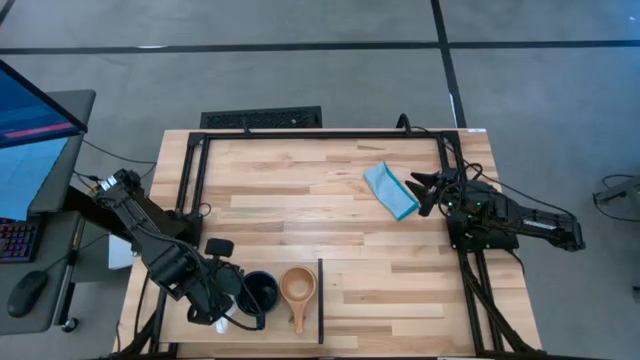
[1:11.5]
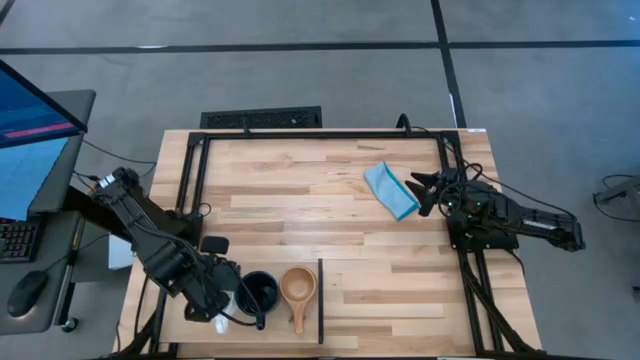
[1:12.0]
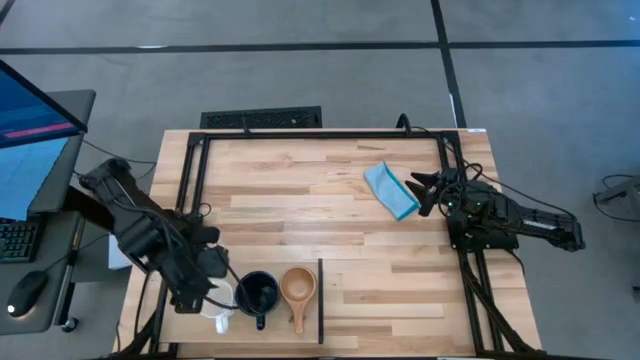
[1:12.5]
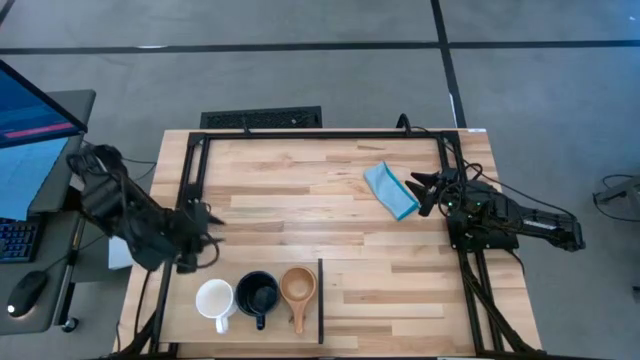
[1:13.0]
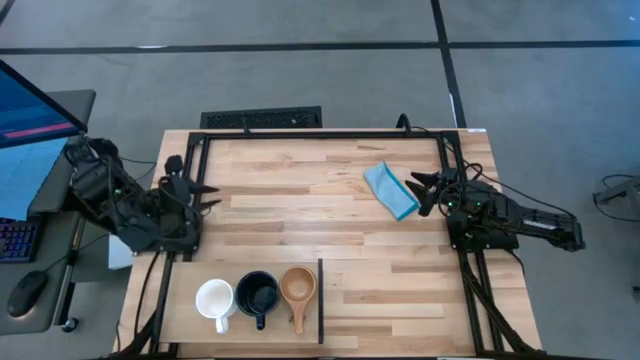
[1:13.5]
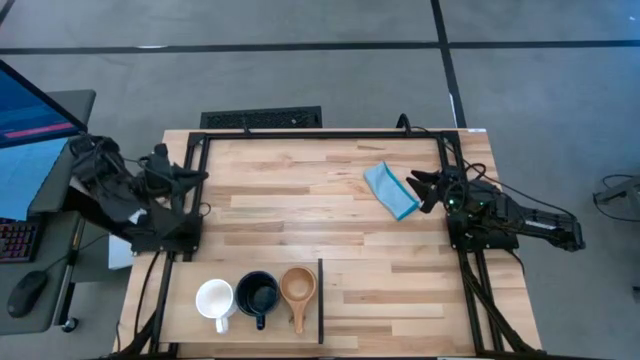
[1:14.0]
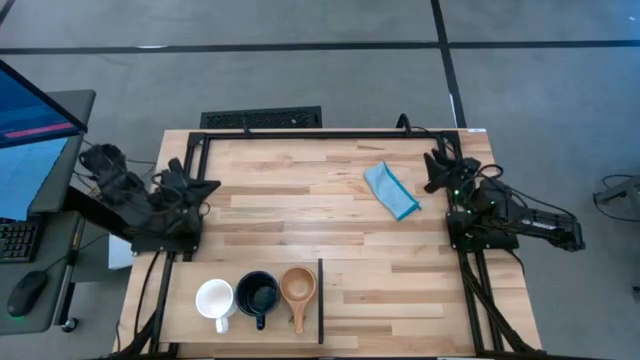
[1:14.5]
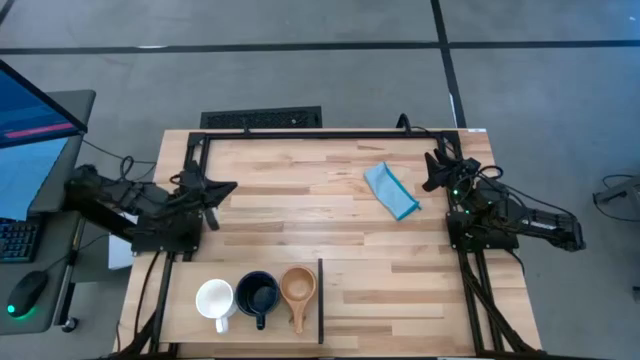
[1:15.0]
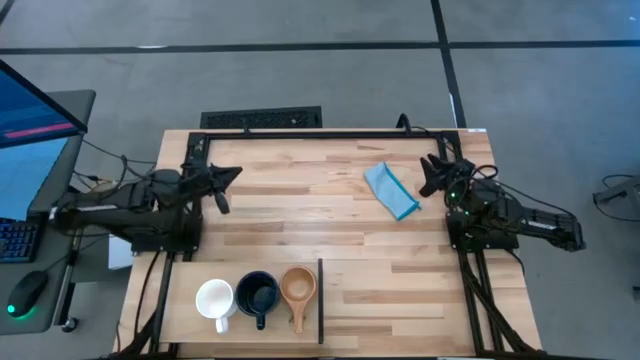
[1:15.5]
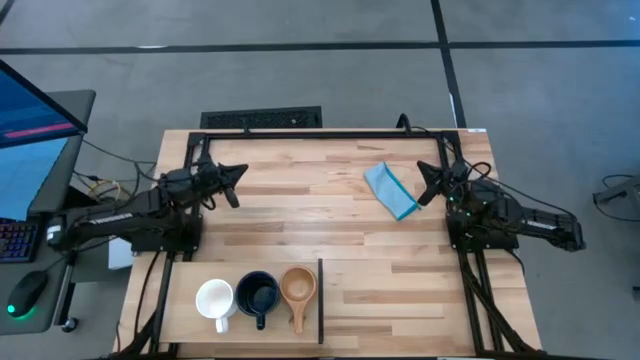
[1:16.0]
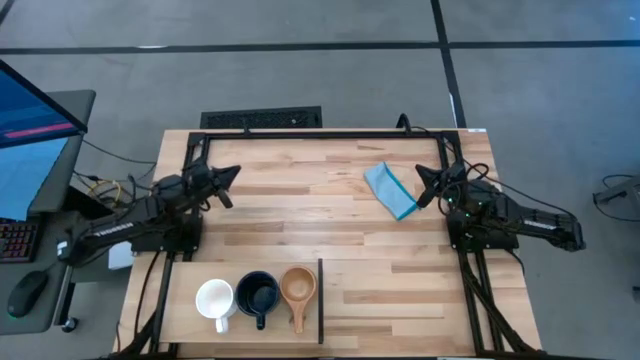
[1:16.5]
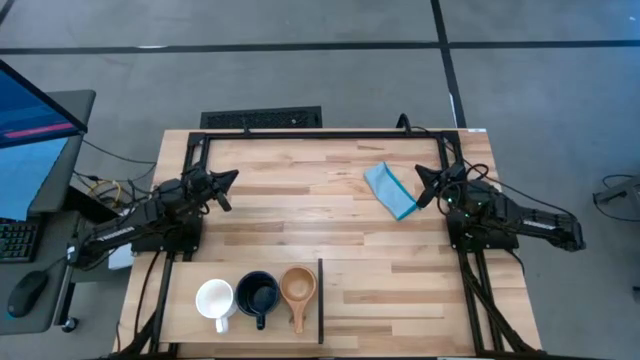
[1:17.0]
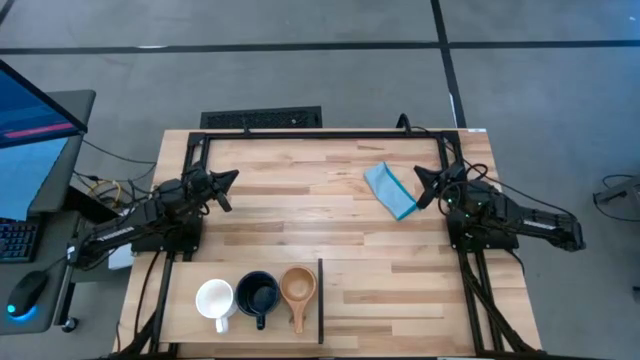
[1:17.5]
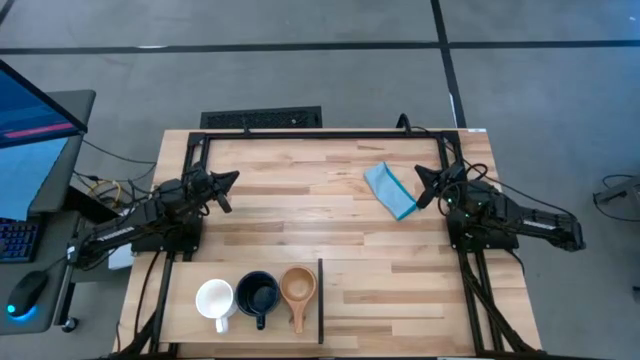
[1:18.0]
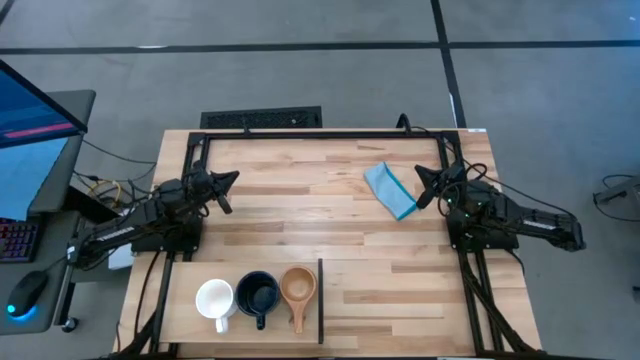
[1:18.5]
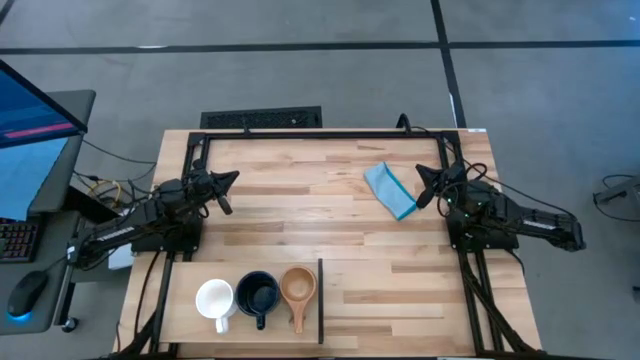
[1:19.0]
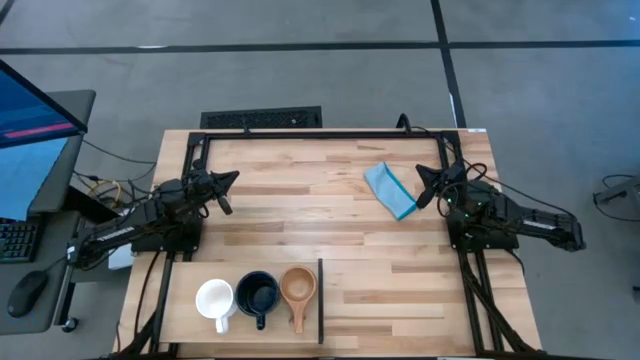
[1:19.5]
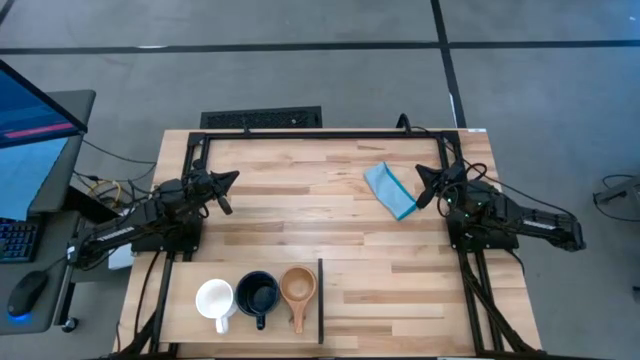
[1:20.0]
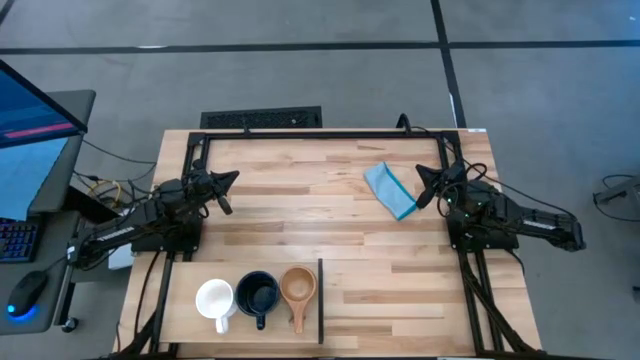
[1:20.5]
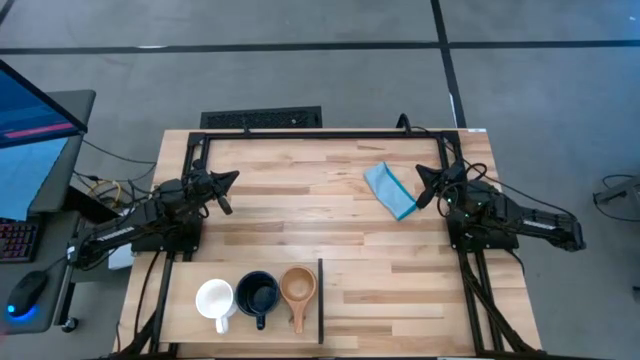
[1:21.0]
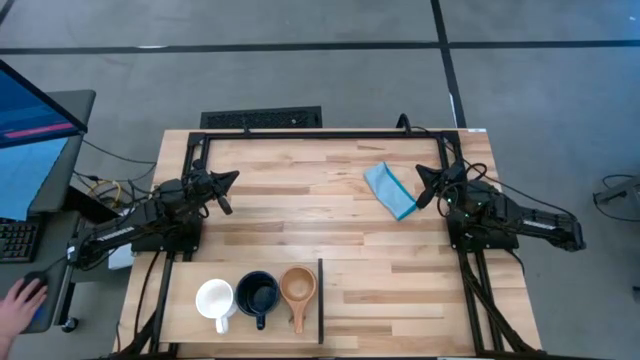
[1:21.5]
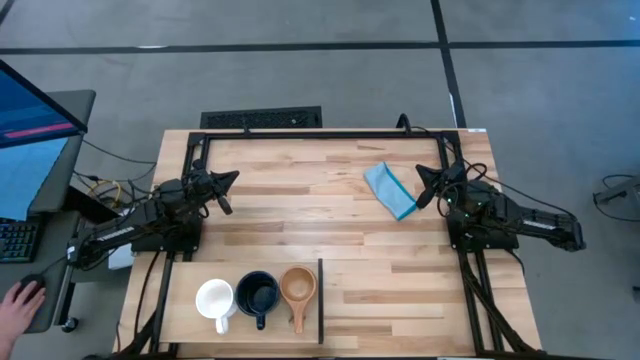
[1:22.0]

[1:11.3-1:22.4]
Task: Stack small to large cups/mugs on shelf
Return to Home Position

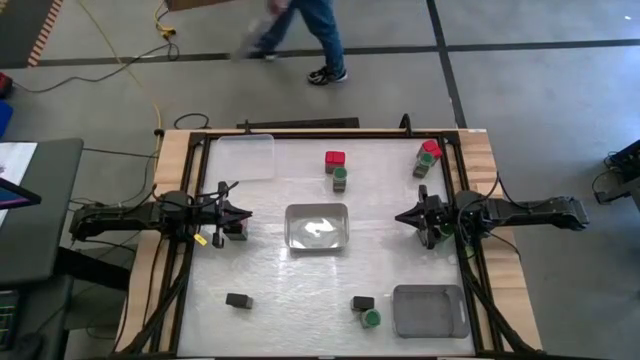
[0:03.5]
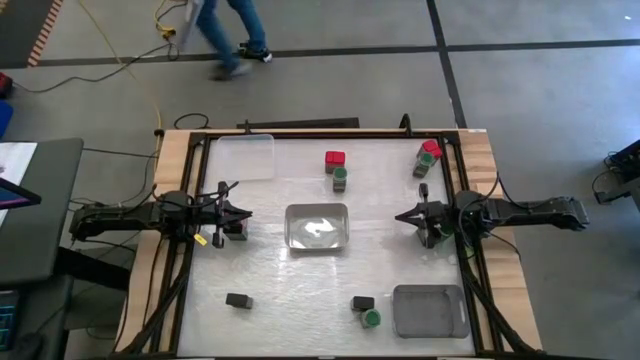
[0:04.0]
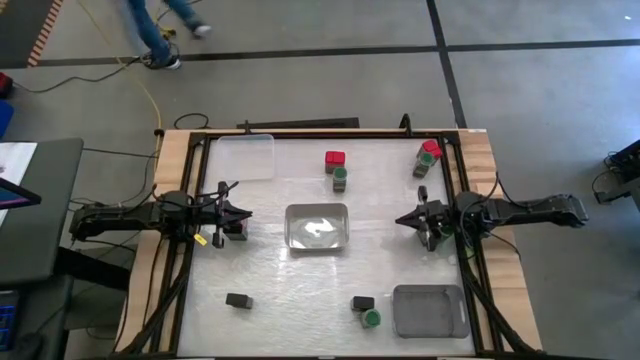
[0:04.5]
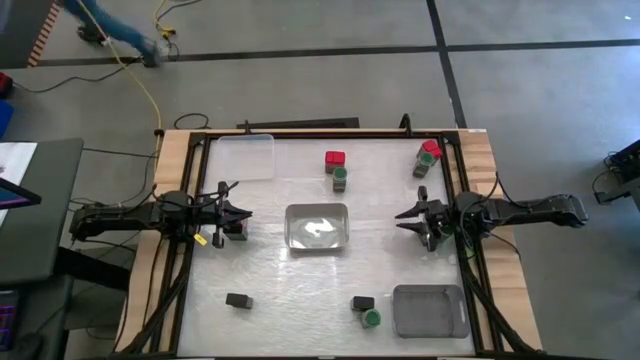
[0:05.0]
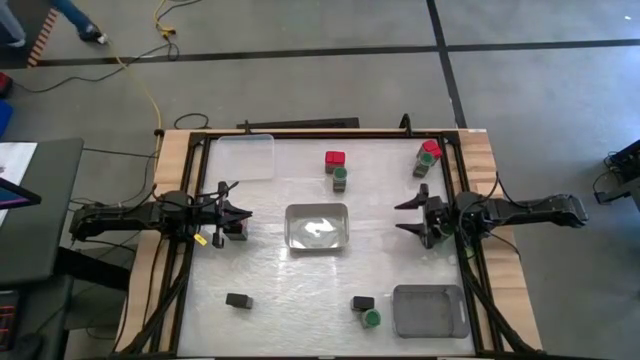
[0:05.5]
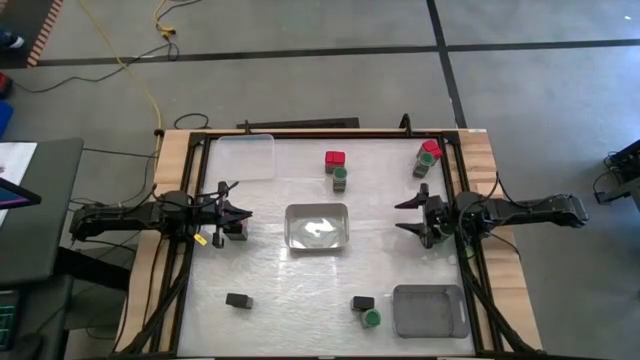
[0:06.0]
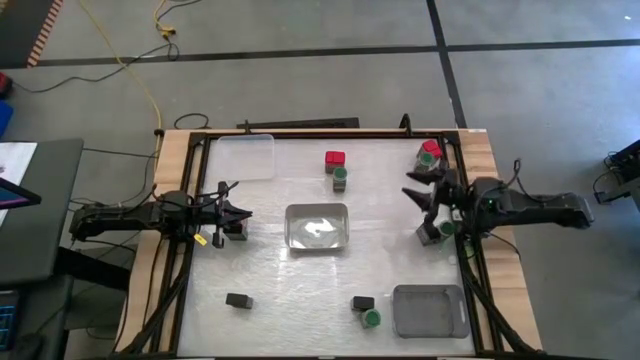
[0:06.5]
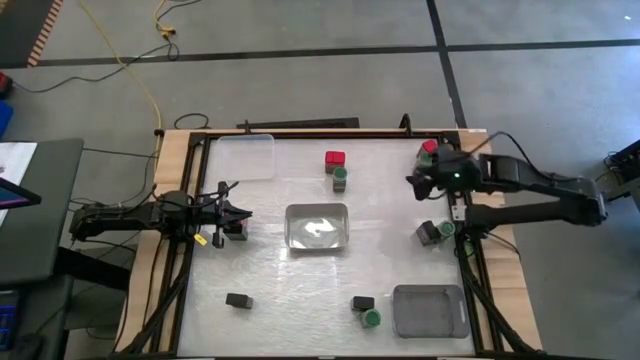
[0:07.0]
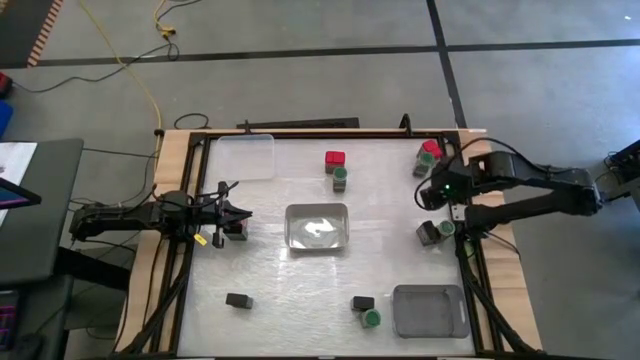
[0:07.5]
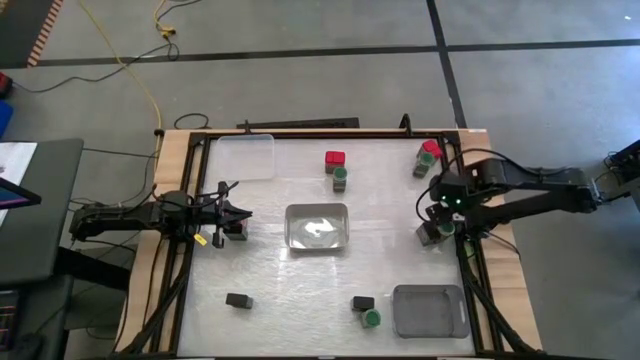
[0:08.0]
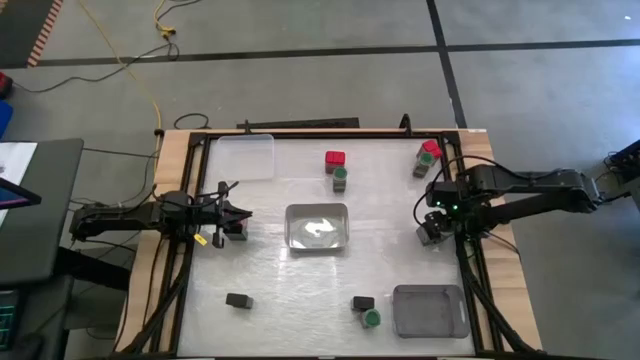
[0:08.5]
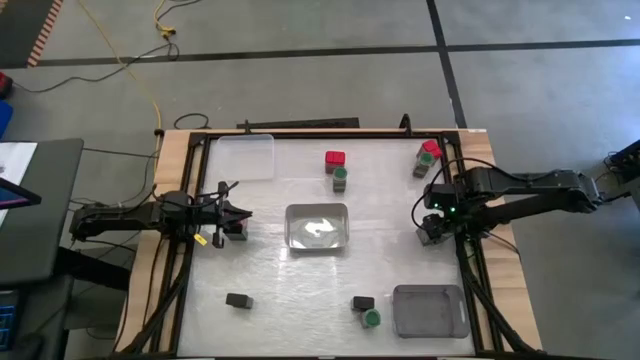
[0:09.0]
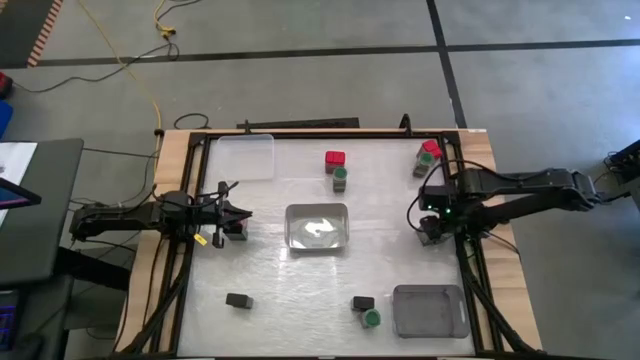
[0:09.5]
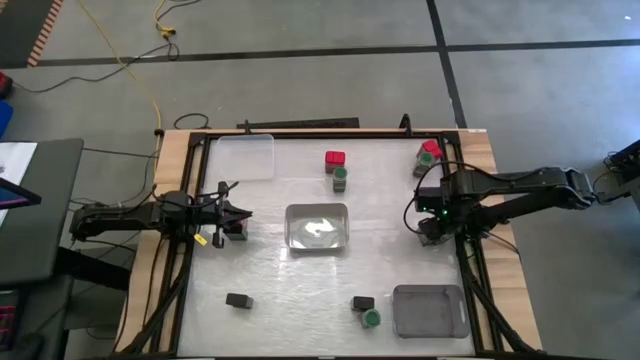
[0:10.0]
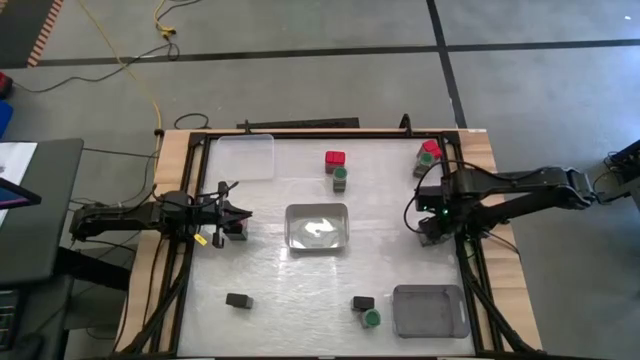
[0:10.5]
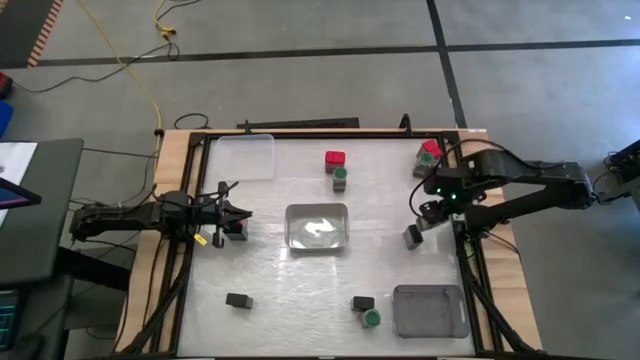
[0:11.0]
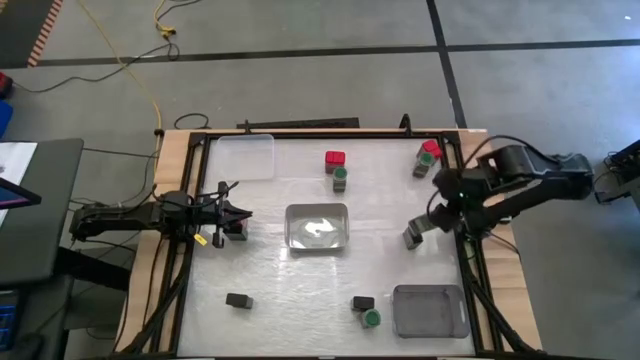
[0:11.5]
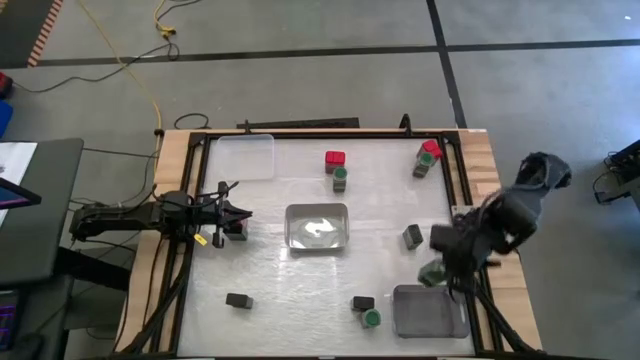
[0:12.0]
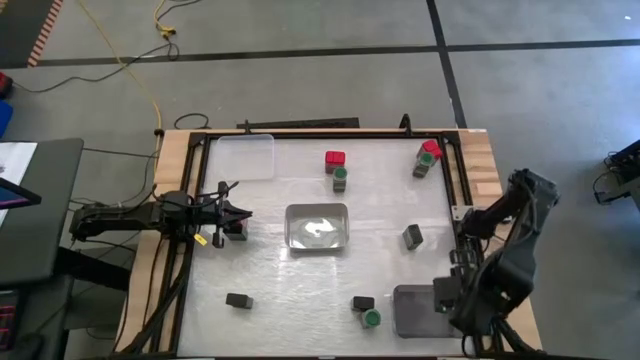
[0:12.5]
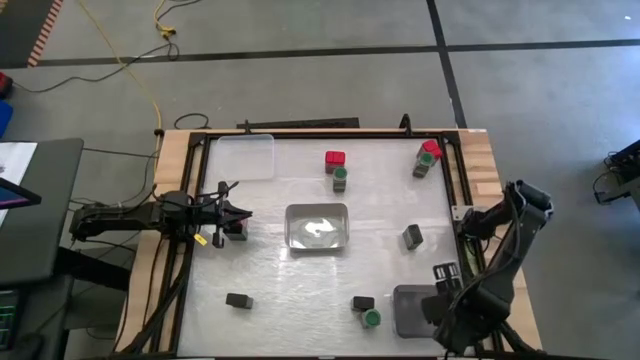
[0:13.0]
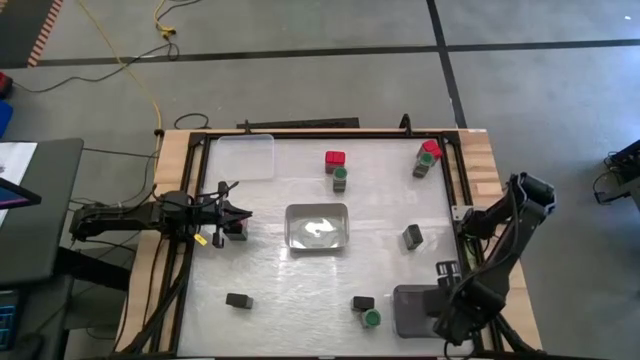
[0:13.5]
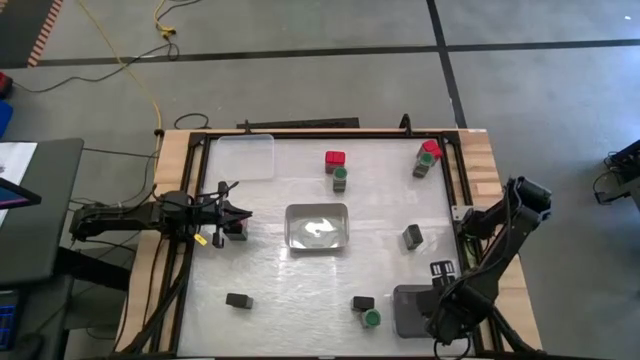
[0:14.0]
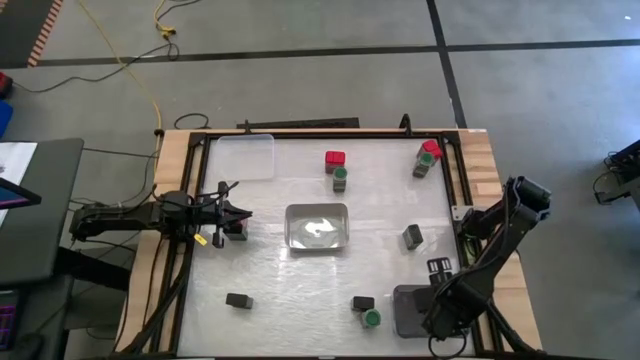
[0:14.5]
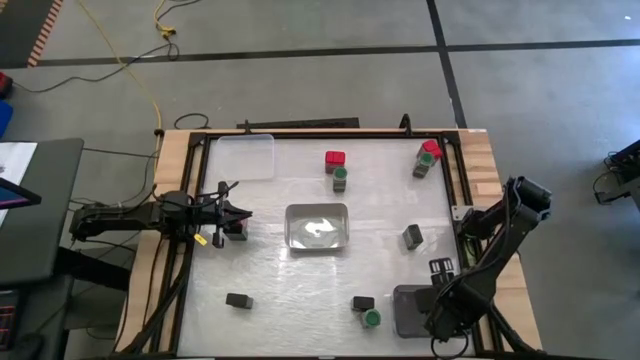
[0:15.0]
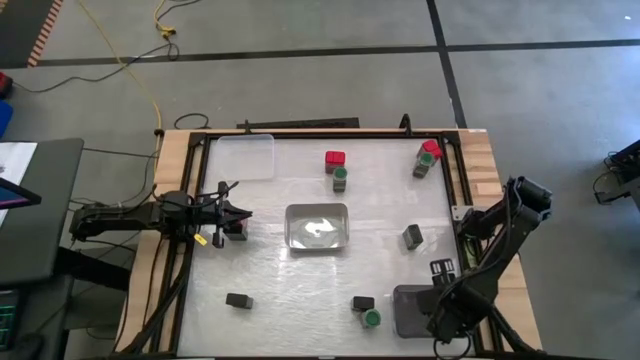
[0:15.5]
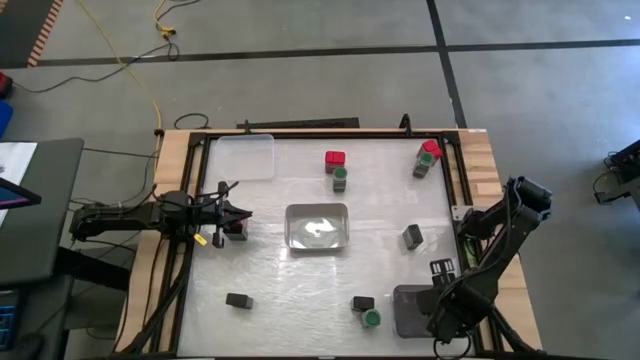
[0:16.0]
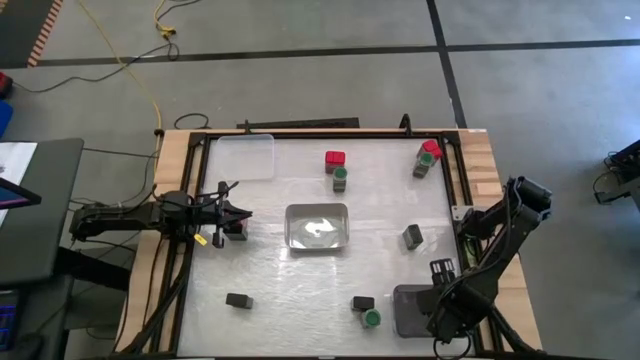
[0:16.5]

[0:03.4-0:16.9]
Task: Sort spices by type
Put the middle green seasoning bottle into the black bin
